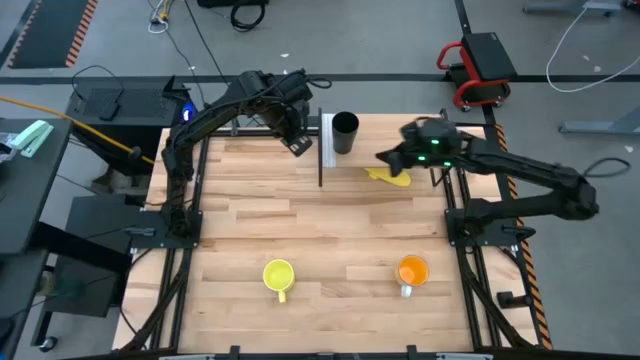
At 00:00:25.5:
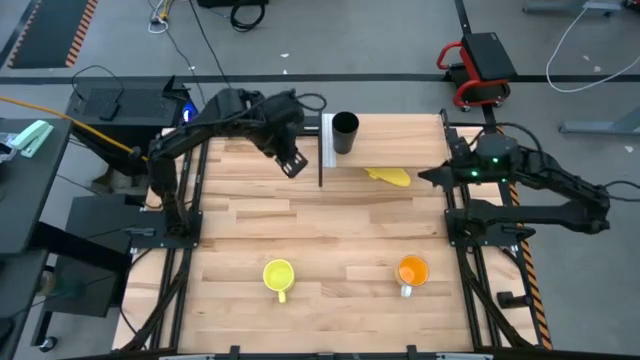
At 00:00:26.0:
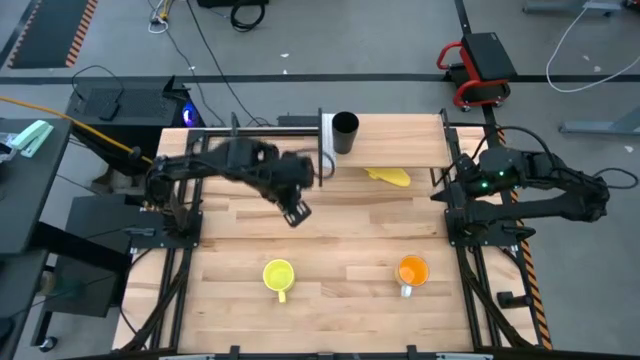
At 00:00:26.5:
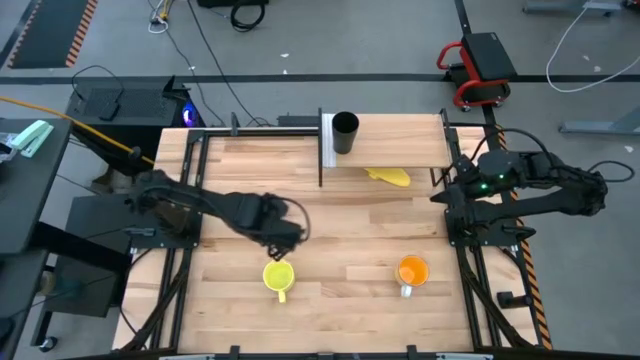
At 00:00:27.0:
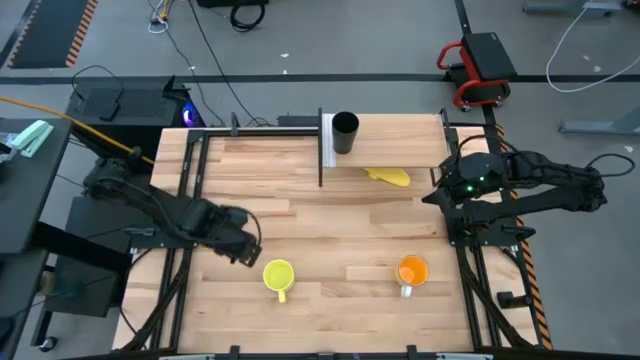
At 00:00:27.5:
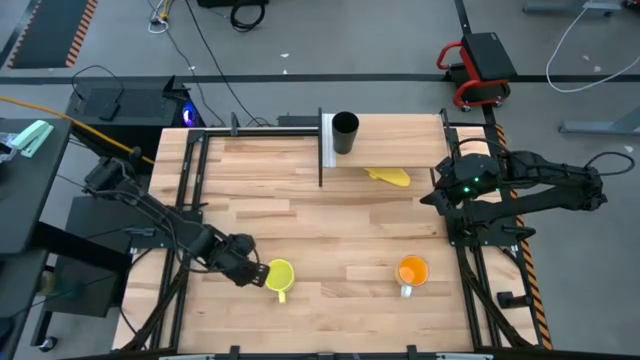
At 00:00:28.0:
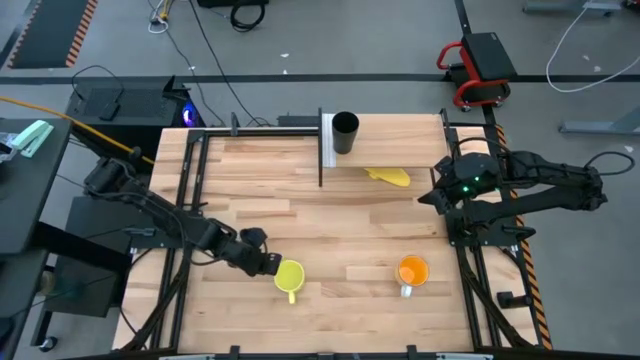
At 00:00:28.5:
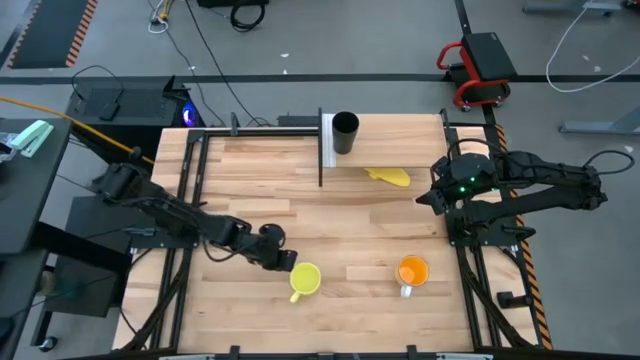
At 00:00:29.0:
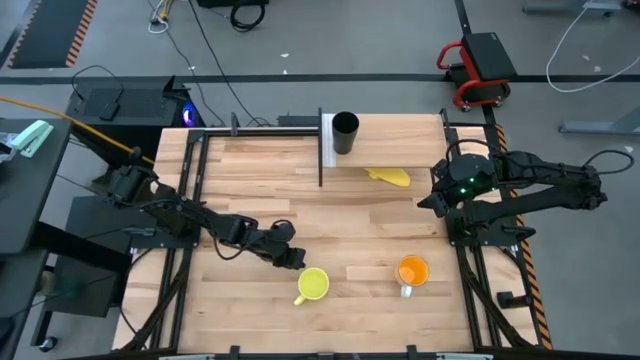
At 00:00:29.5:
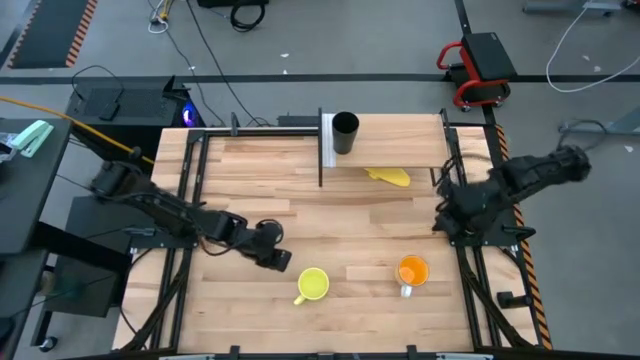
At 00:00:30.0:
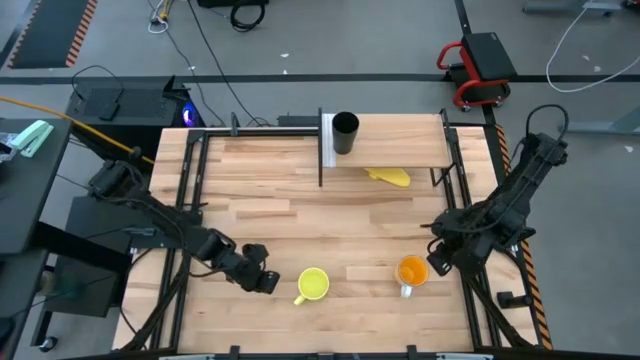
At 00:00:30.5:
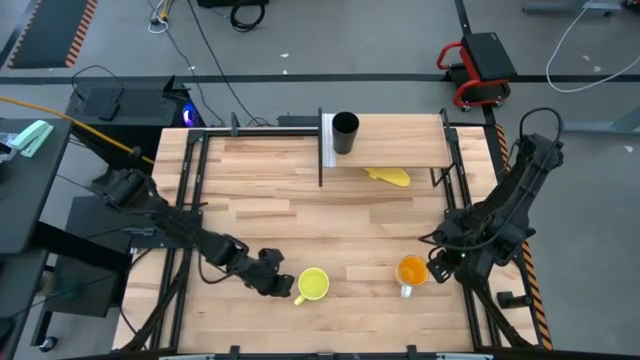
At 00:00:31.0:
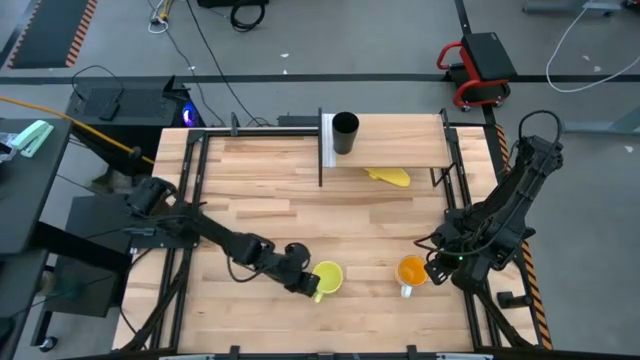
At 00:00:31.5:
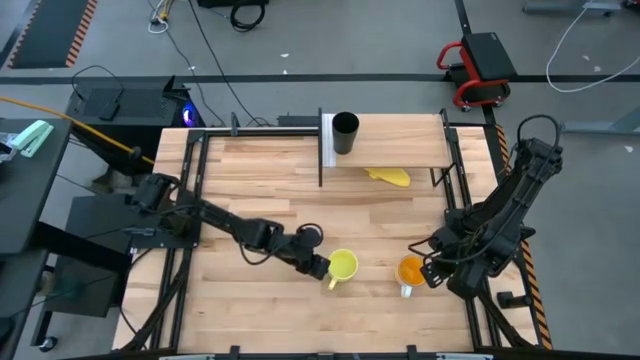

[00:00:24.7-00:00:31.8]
Task: Stack small to large cups/mugs on shelf
Move the yellow mug to the center of the table

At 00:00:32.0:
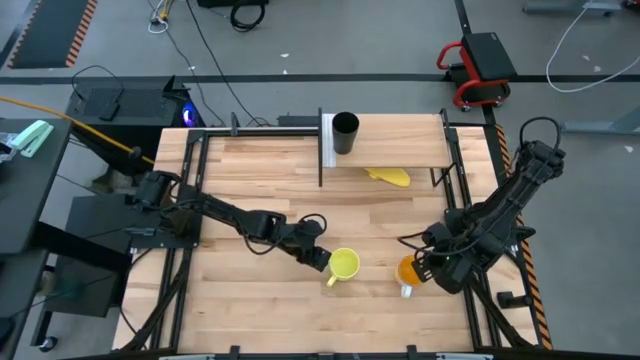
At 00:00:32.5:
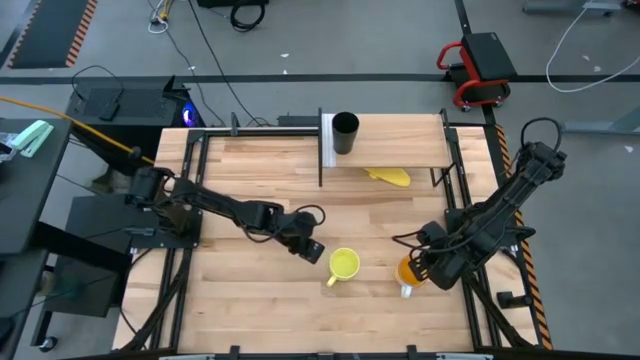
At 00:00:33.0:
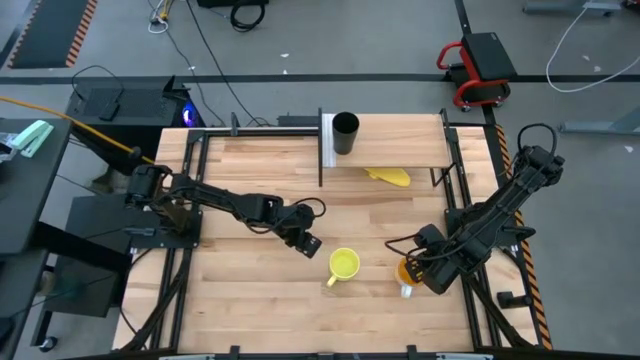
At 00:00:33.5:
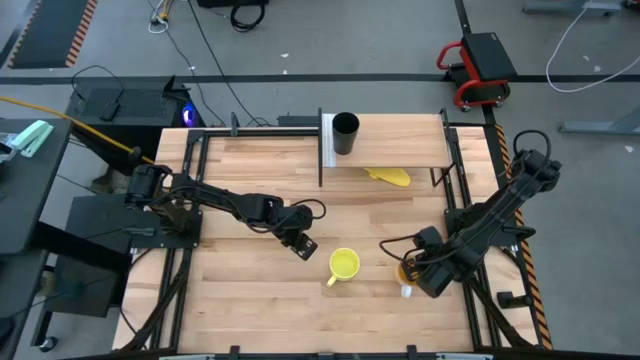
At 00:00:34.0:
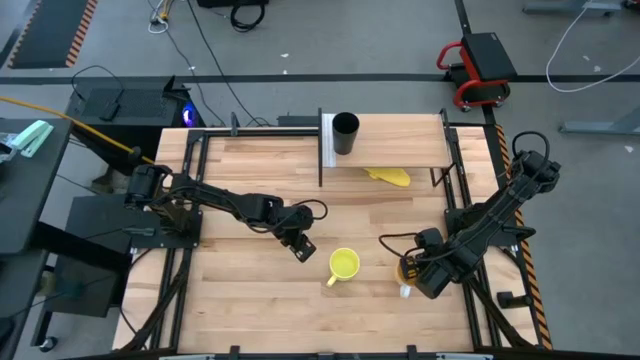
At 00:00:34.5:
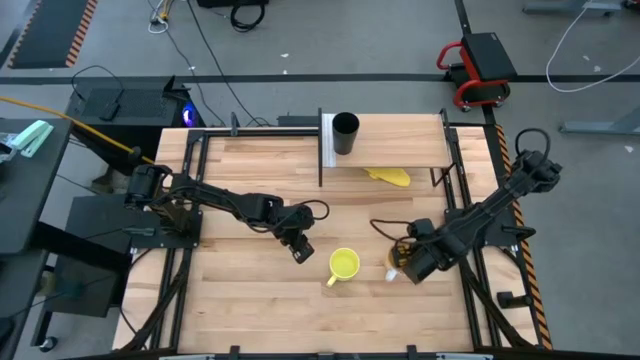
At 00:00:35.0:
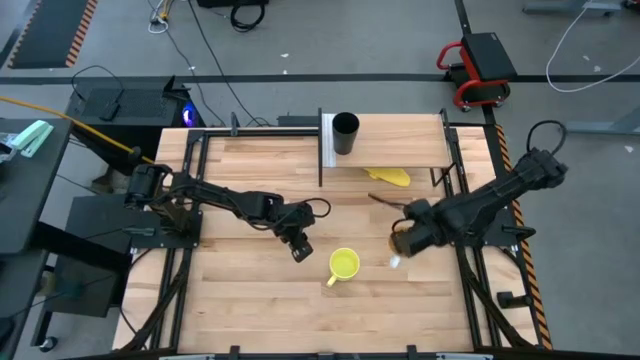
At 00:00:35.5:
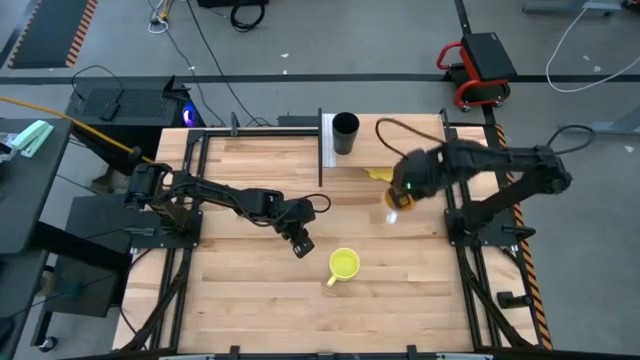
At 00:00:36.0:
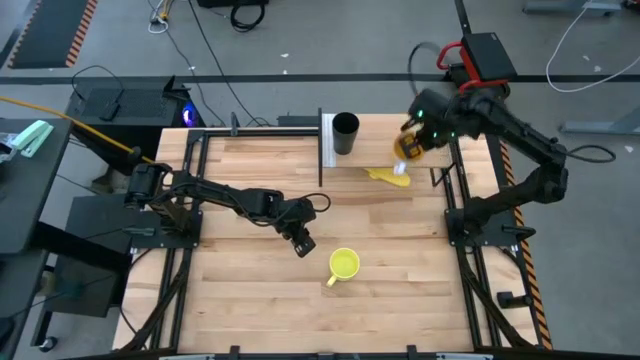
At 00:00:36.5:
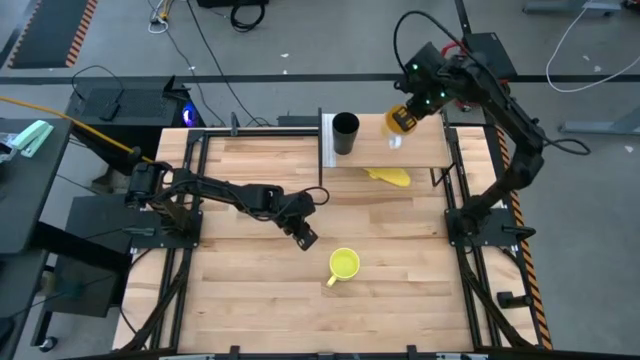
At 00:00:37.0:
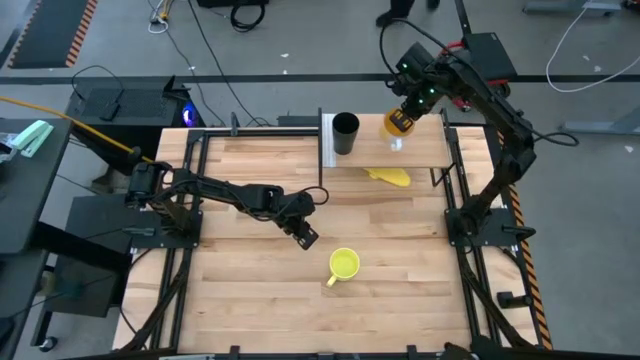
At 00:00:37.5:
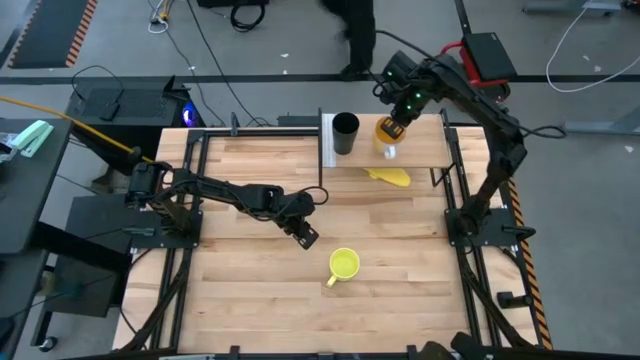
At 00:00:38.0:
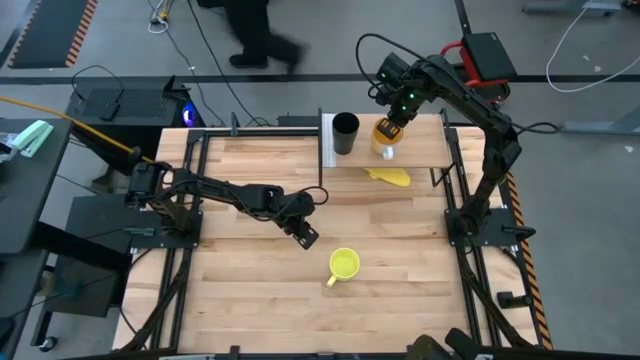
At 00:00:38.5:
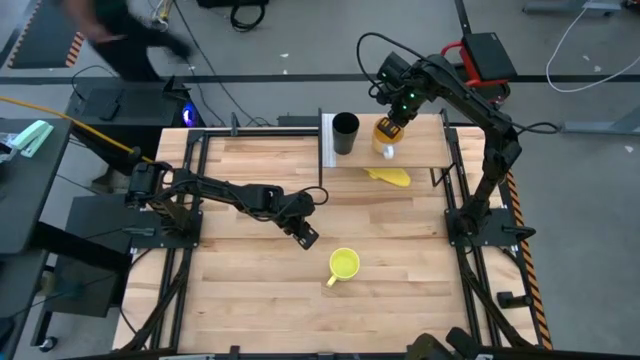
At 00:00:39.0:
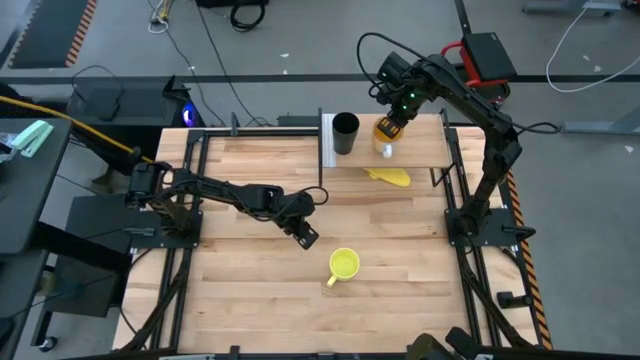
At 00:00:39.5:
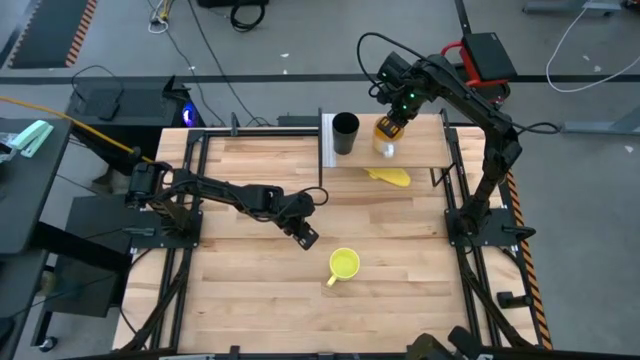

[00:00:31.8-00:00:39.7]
Put the orange mug on the shelf
